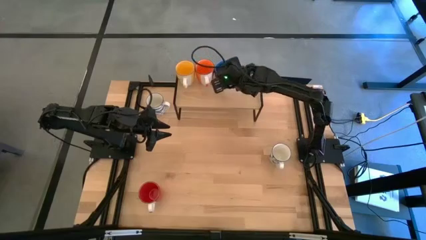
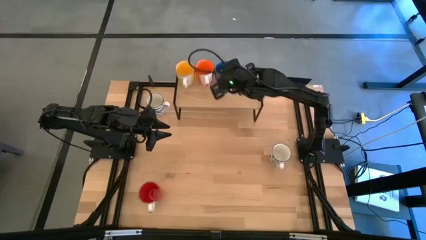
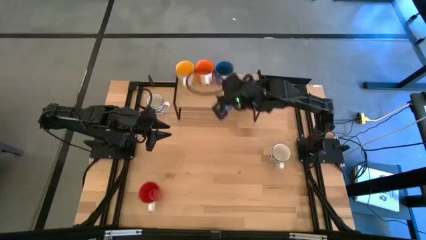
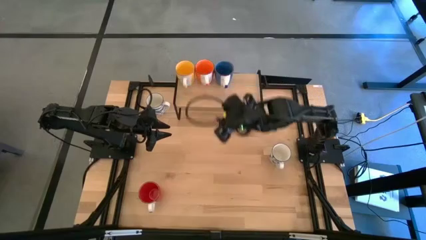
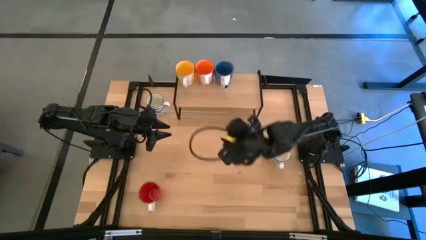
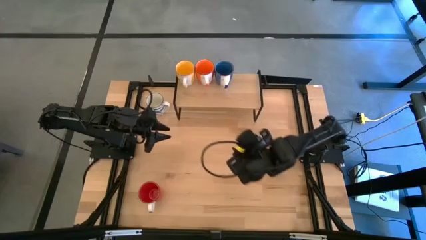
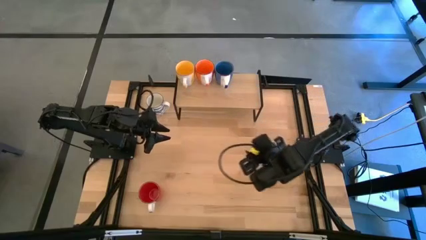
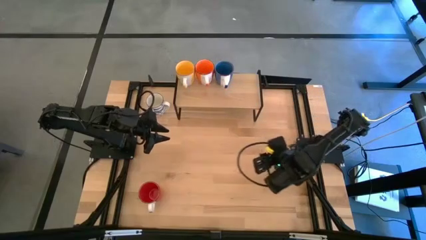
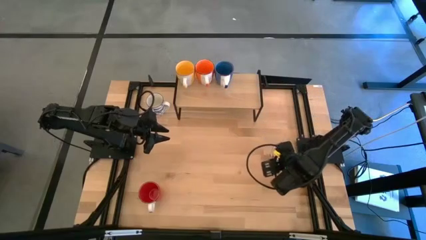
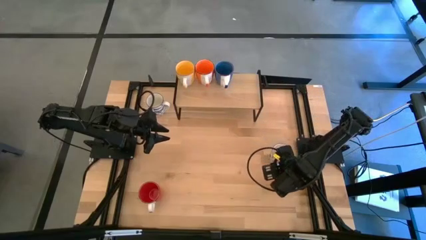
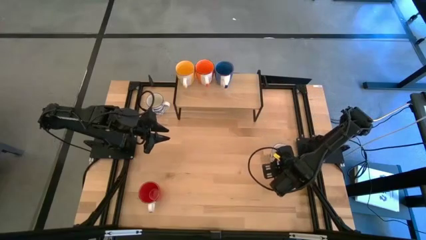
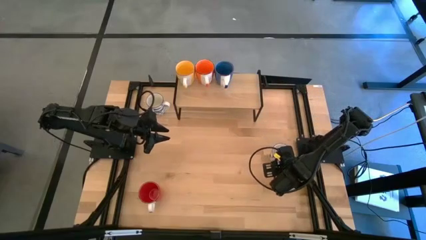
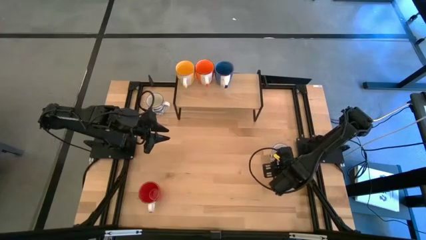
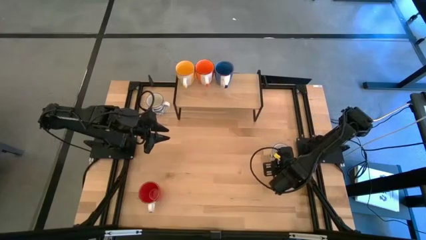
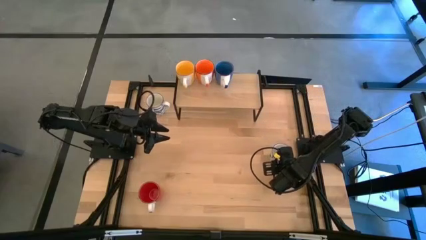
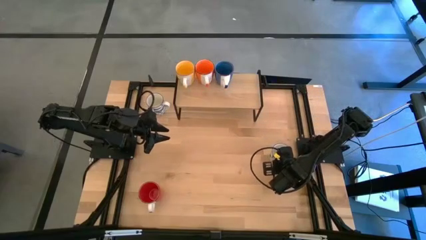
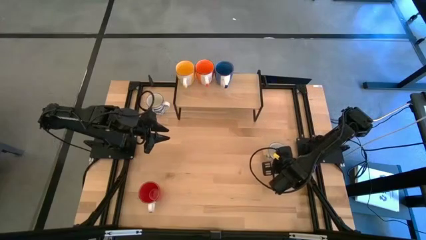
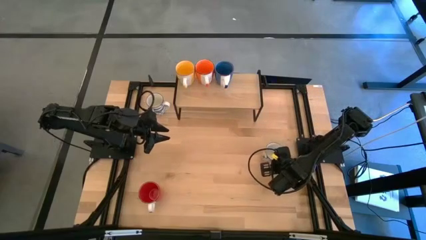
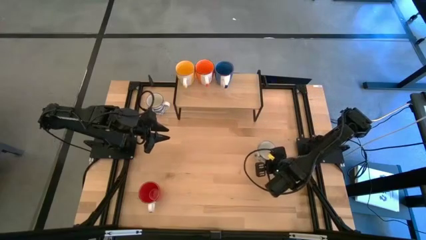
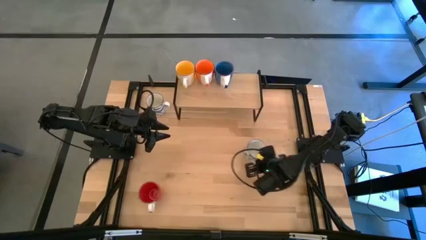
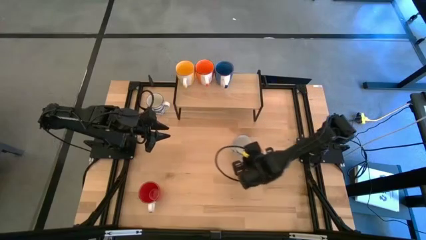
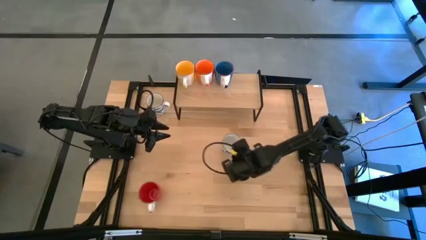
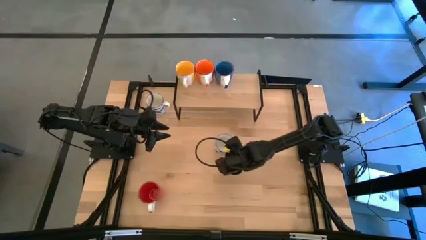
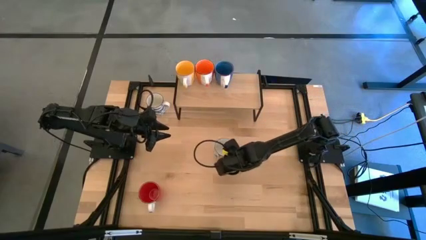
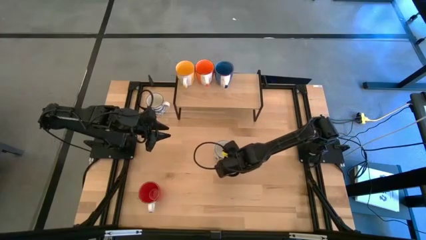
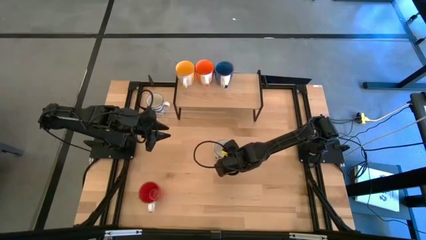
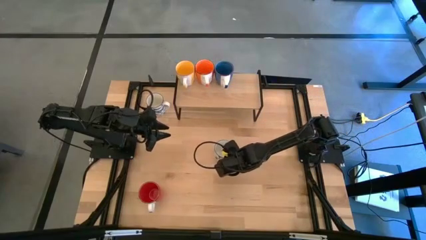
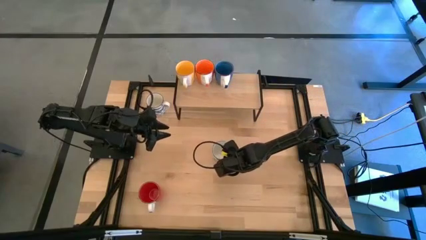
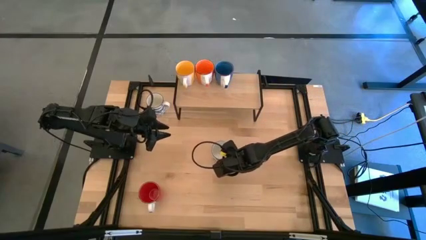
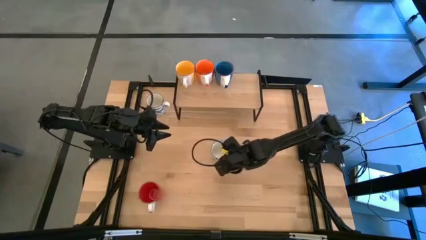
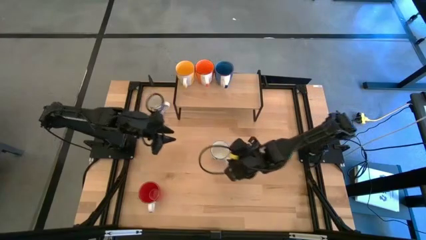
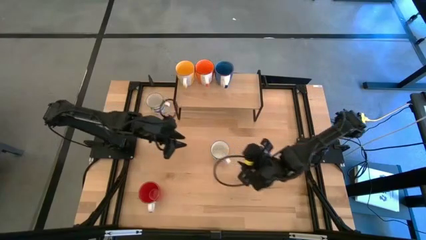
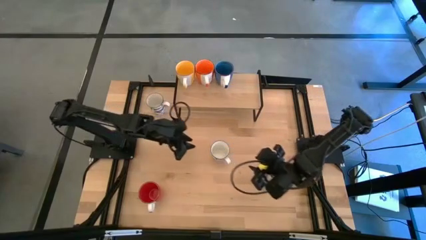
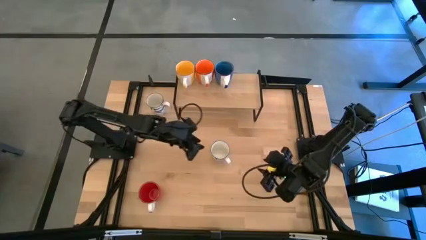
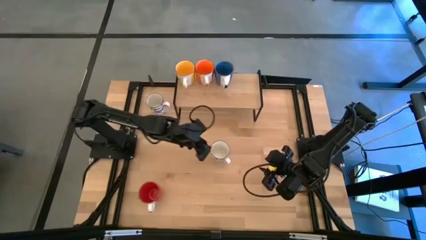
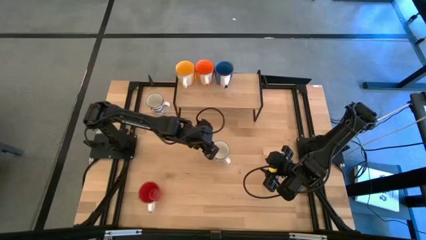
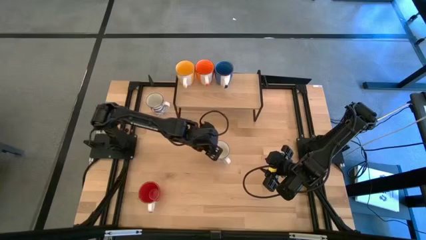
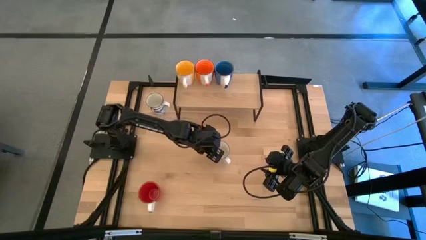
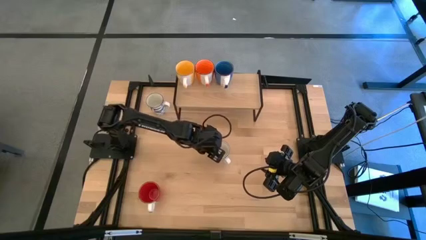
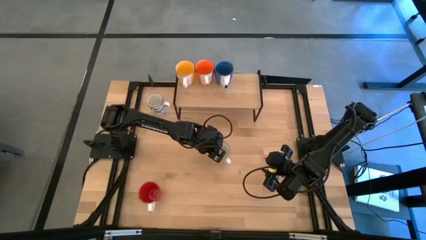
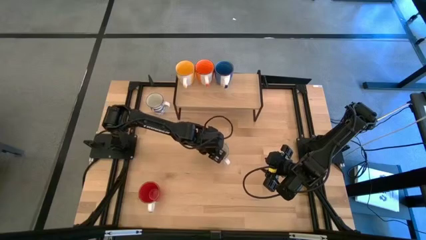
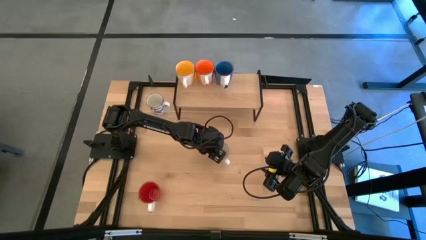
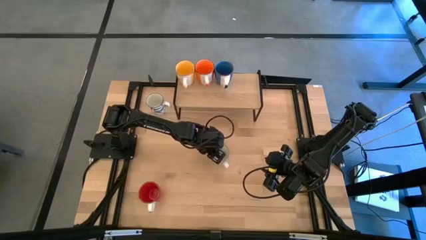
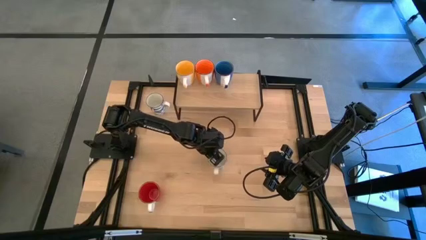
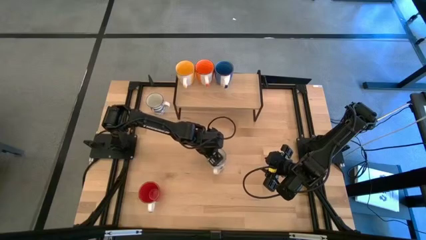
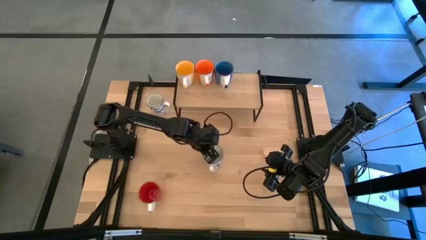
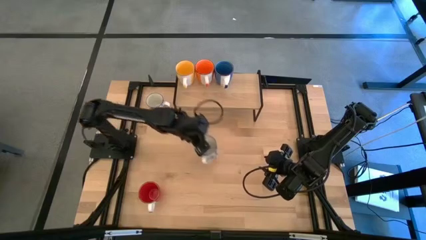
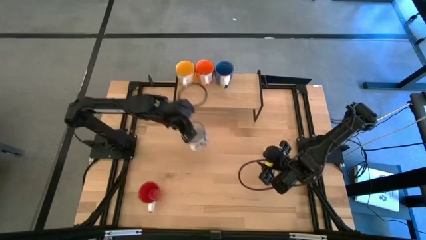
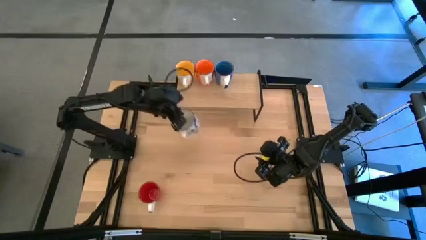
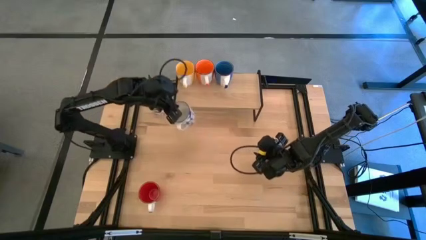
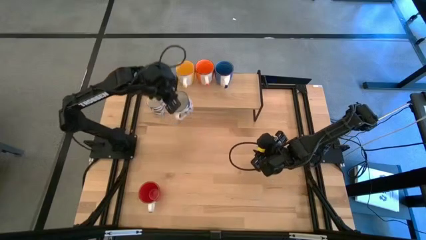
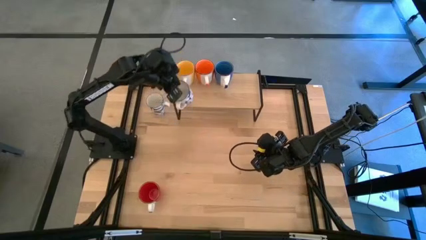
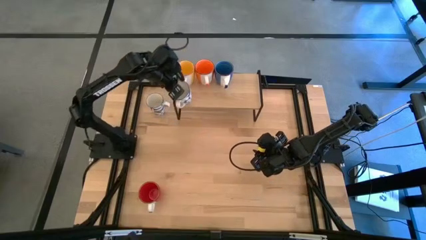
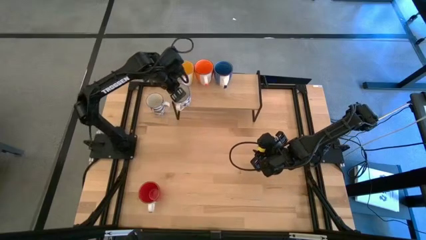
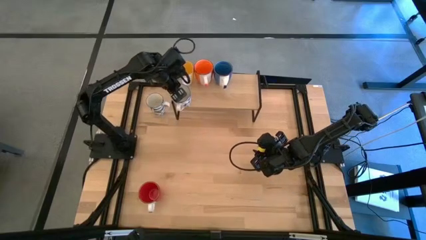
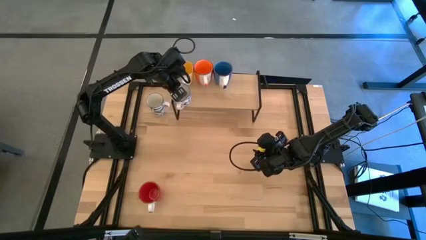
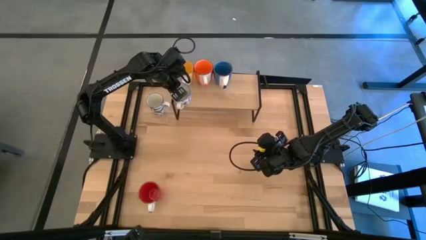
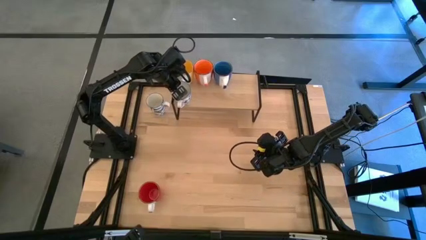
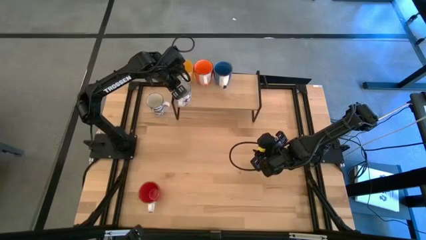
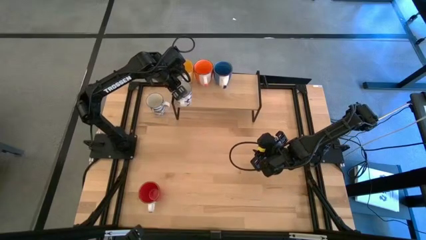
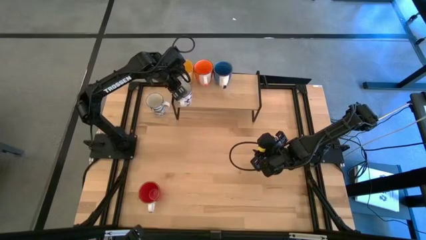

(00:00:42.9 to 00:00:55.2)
Task: Place coffee mugs
Put the bottom blue patterned mug on the shelf
